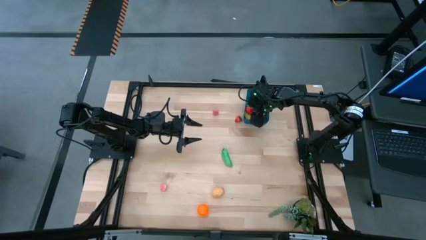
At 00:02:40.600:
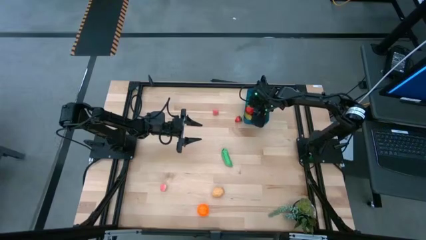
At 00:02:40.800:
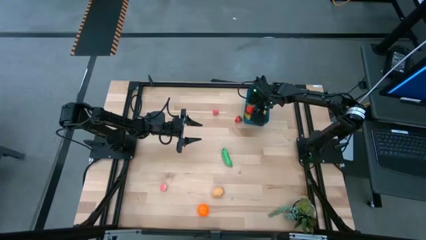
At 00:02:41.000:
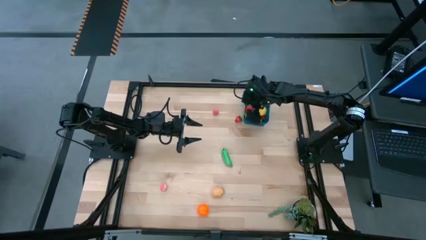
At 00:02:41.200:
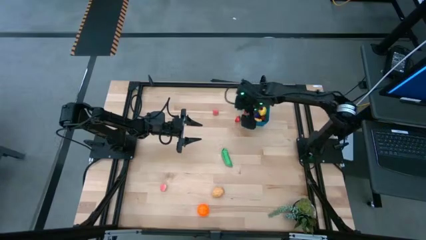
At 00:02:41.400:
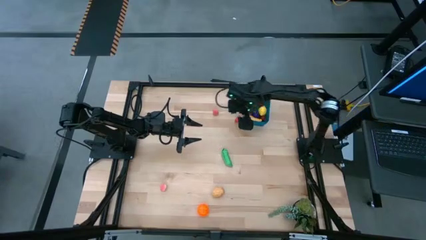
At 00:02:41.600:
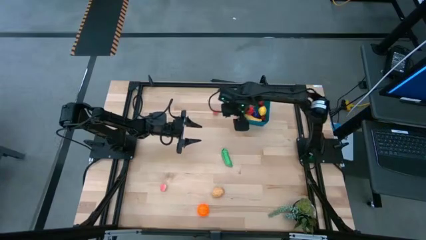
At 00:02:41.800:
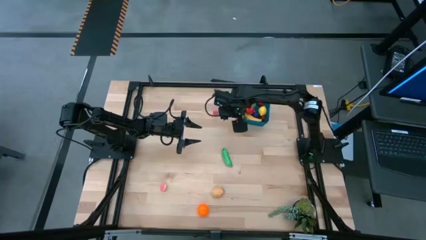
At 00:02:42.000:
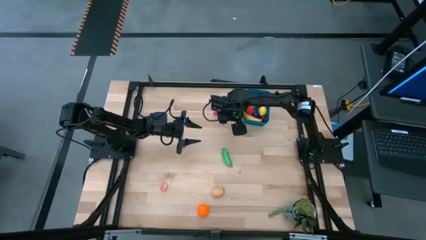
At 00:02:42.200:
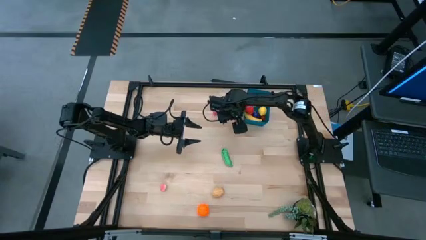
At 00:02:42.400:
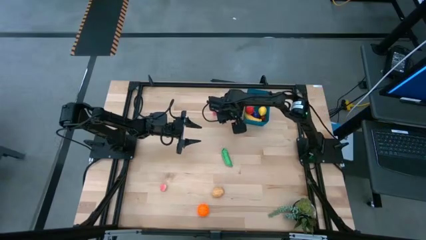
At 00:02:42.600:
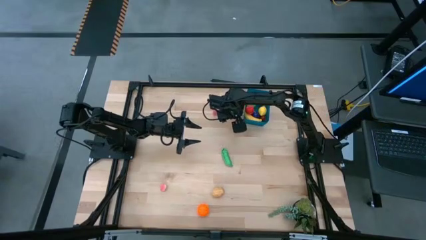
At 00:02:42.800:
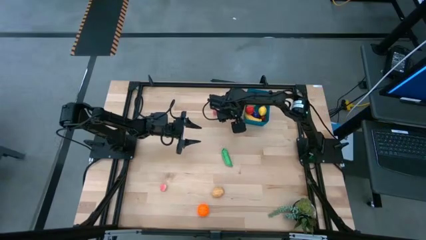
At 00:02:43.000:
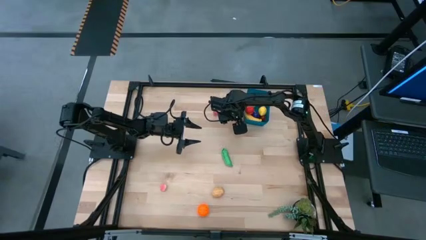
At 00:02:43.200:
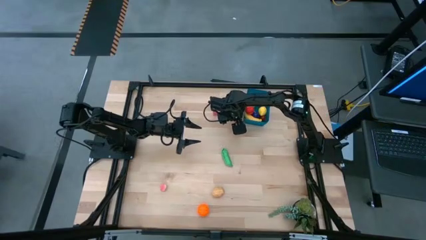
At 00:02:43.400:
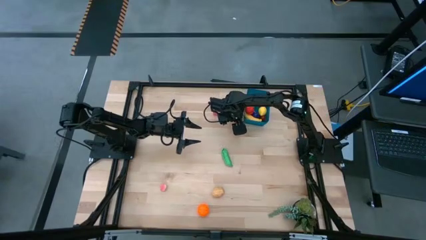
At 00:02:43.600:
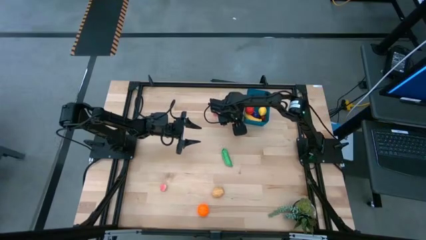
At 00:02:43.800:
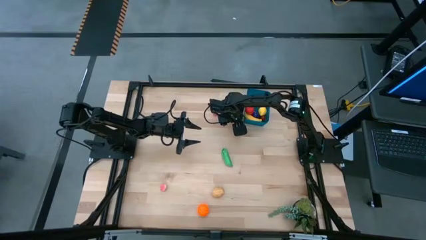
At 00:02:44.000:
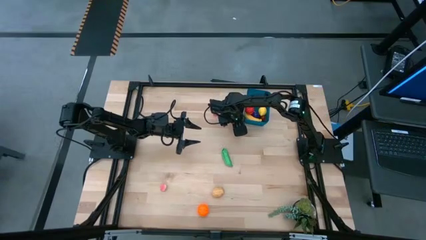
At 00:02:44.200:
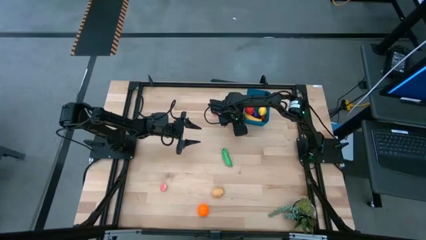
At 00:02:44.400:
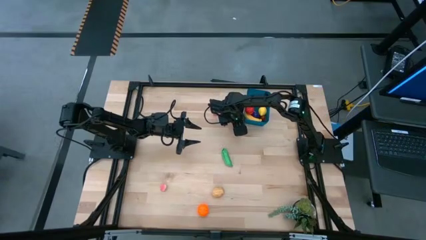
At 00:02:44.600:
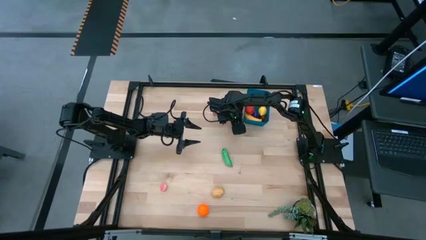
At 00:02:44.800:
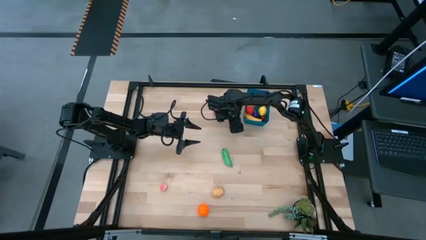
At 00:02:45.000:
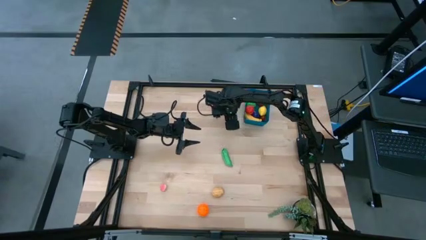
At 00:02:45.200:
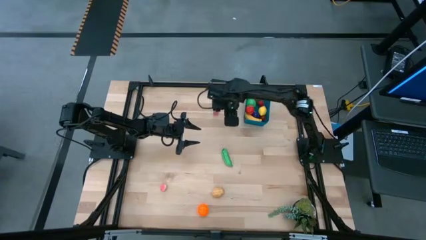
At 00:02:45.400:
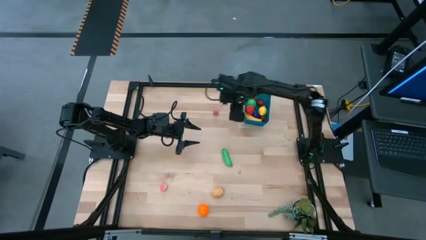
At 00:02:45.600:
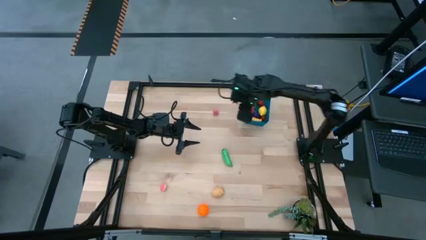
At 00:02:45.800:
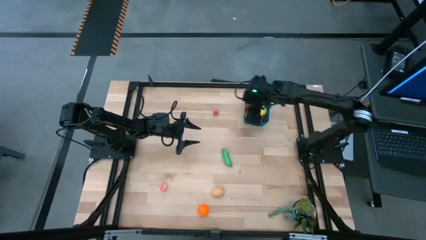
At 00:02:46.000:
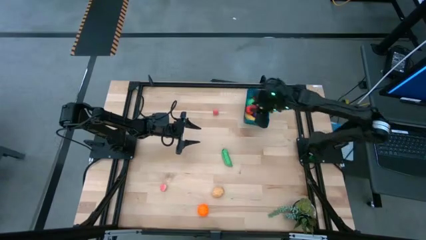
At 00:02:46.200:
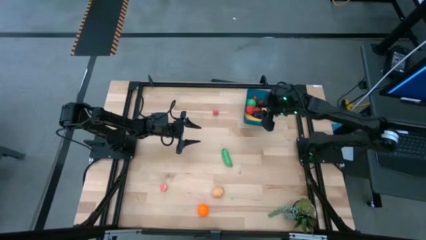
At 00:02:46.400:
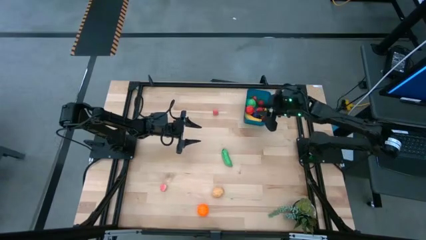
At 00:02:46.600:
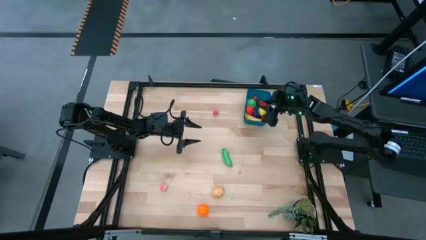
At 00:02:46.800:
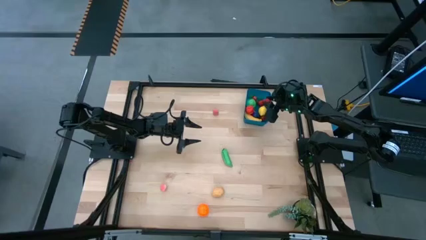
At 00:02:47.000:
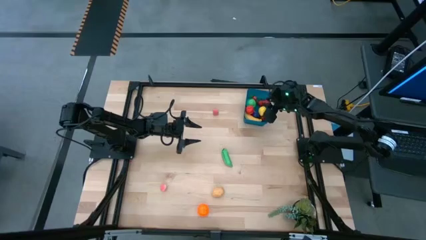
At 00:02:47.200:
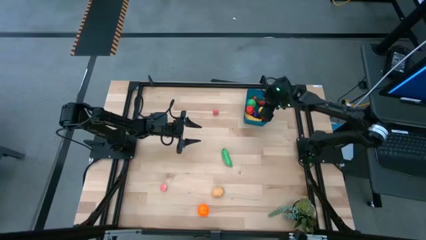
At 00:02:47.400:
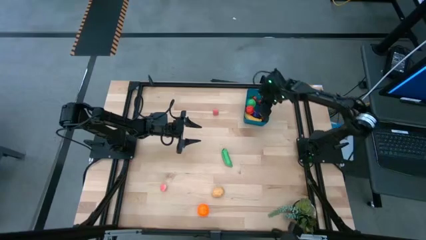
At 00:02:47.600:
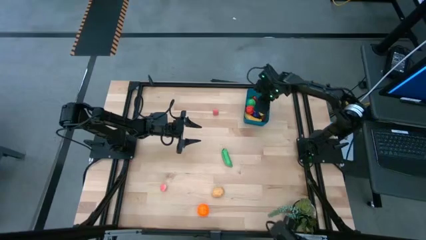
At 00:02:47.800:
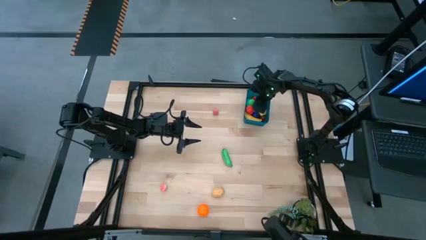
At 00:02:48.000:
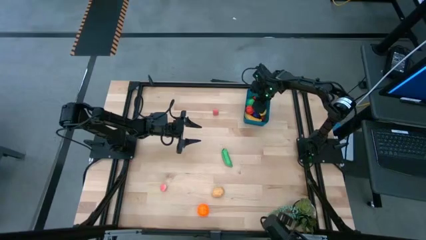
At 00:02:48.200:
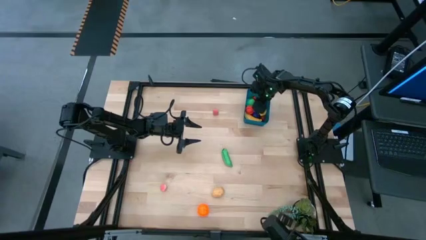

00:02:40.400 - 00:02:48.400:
Task: Pick and placing Produce into tupperware
Put the red strawberry into the blue bin

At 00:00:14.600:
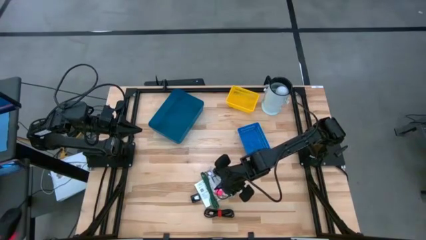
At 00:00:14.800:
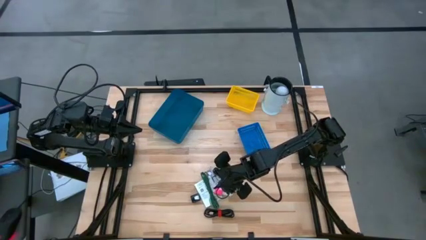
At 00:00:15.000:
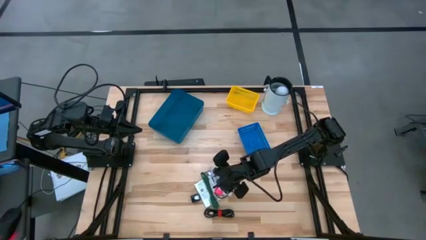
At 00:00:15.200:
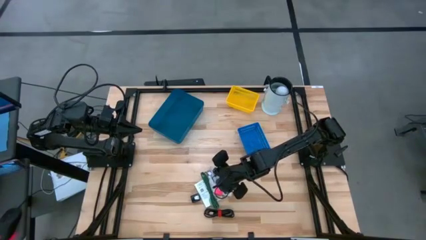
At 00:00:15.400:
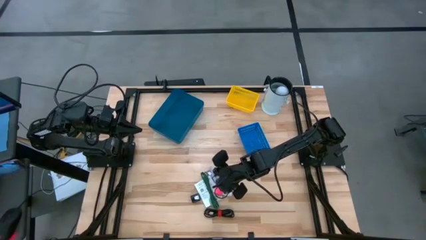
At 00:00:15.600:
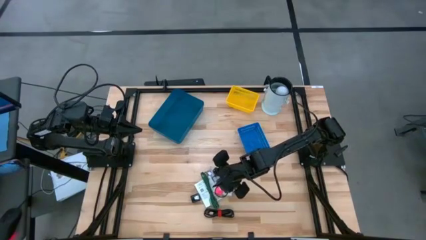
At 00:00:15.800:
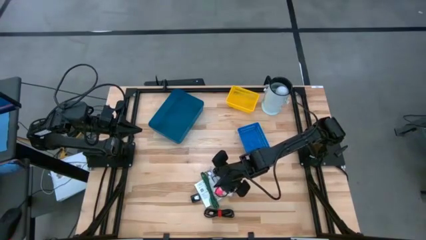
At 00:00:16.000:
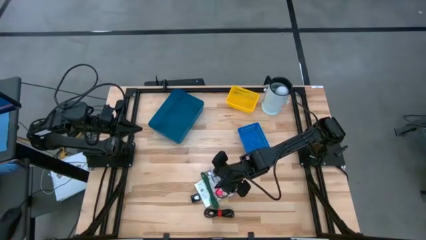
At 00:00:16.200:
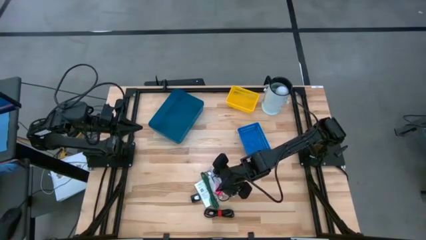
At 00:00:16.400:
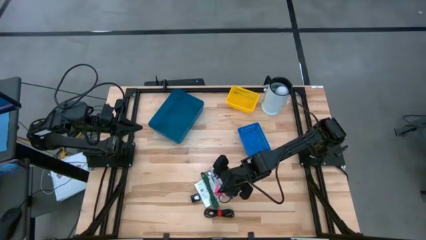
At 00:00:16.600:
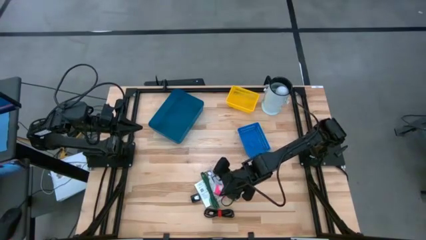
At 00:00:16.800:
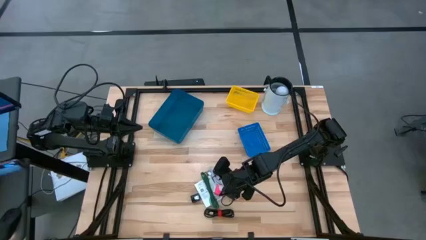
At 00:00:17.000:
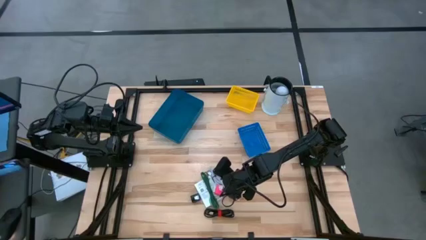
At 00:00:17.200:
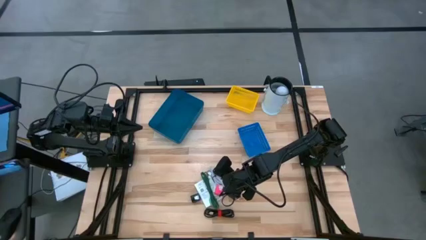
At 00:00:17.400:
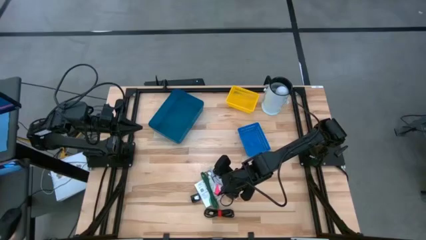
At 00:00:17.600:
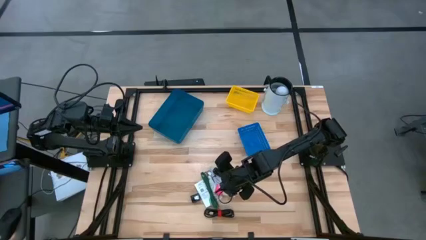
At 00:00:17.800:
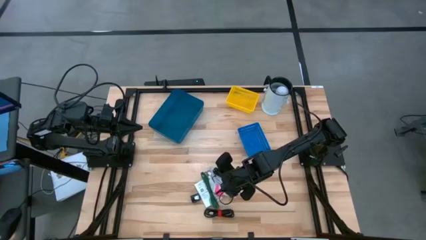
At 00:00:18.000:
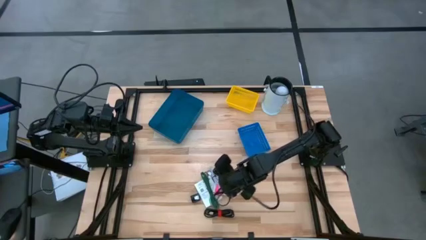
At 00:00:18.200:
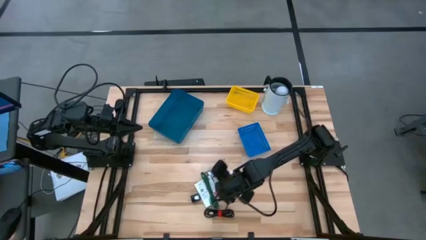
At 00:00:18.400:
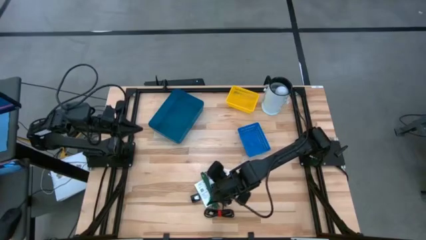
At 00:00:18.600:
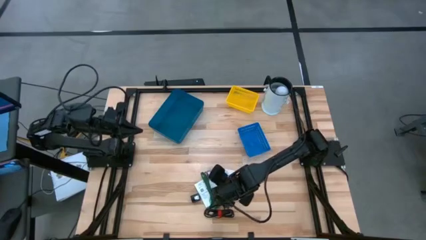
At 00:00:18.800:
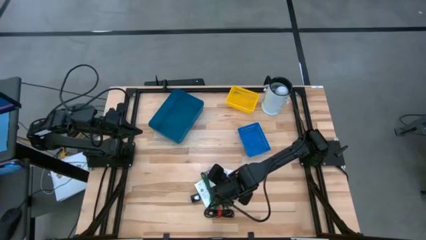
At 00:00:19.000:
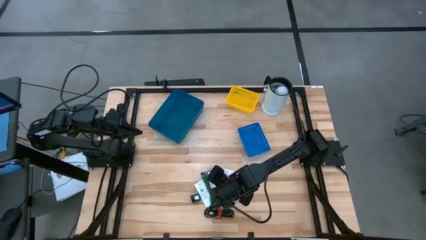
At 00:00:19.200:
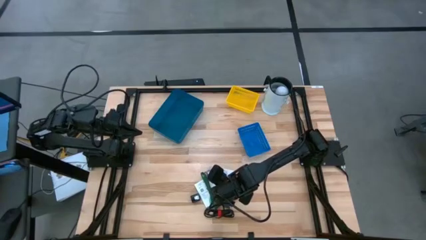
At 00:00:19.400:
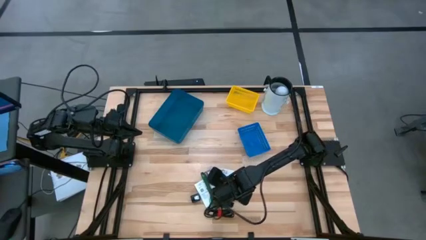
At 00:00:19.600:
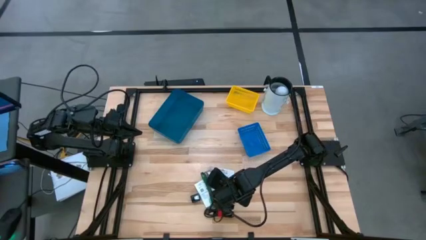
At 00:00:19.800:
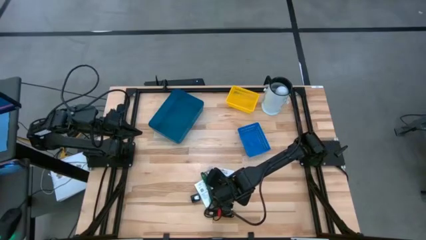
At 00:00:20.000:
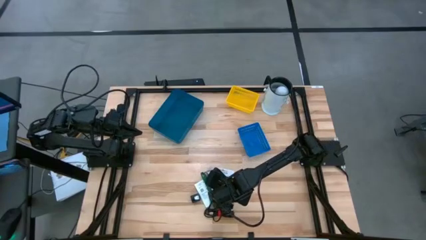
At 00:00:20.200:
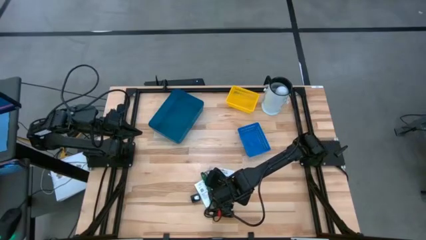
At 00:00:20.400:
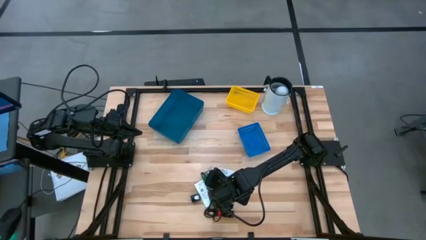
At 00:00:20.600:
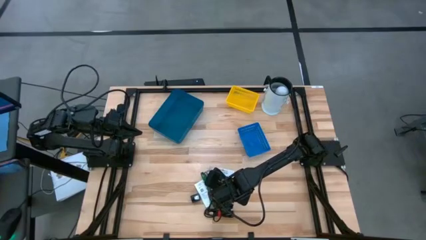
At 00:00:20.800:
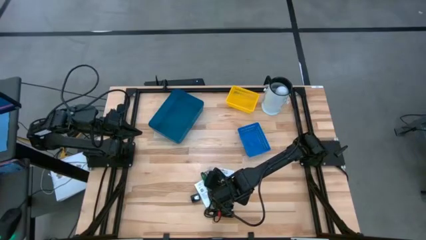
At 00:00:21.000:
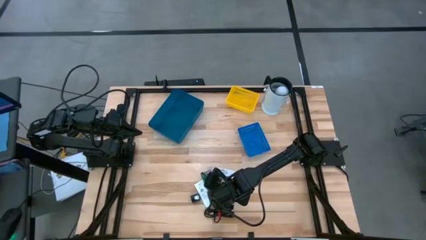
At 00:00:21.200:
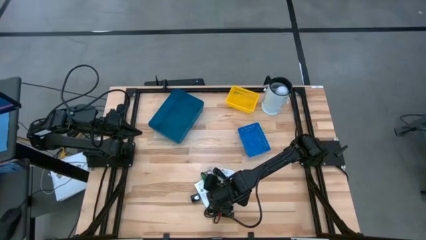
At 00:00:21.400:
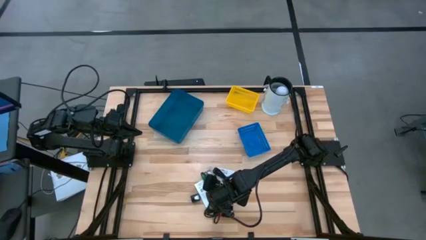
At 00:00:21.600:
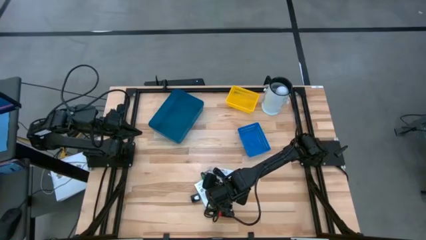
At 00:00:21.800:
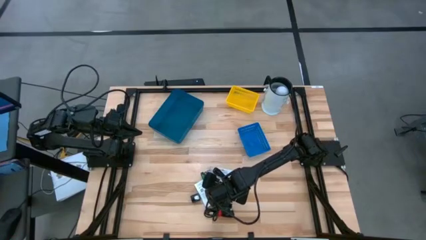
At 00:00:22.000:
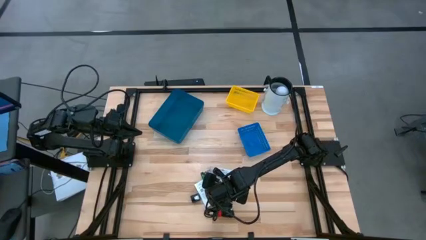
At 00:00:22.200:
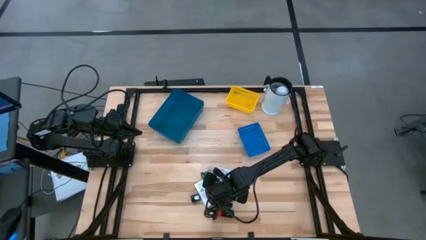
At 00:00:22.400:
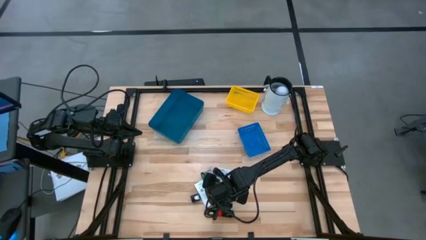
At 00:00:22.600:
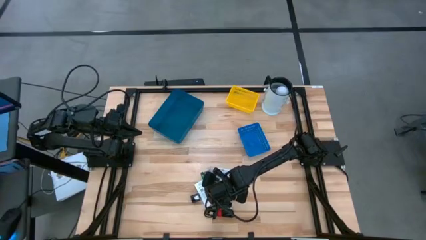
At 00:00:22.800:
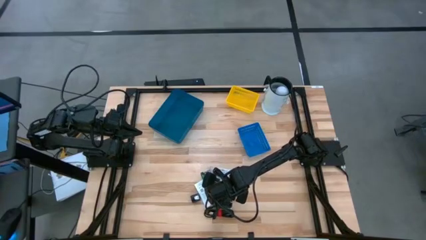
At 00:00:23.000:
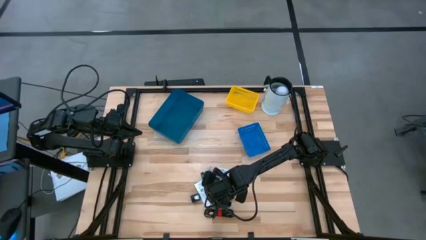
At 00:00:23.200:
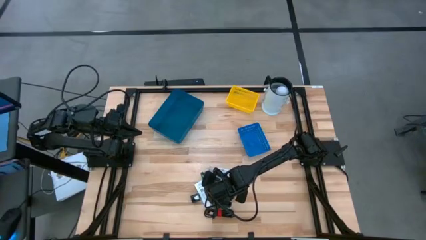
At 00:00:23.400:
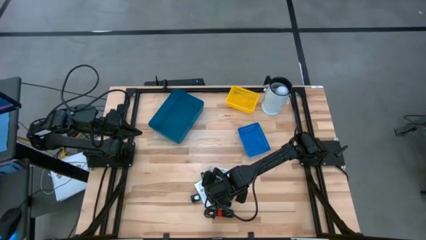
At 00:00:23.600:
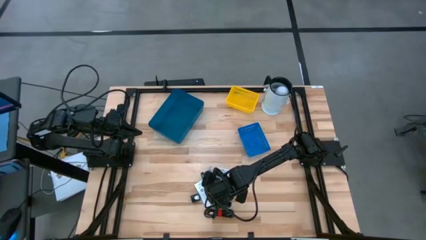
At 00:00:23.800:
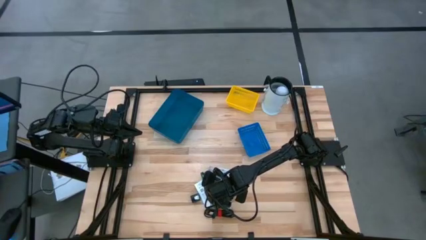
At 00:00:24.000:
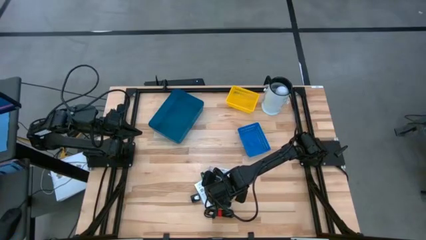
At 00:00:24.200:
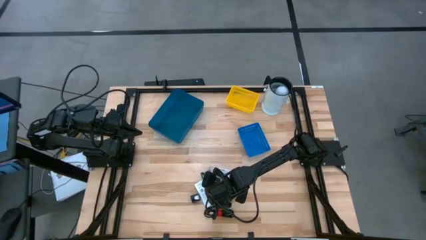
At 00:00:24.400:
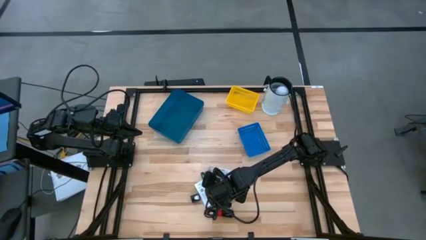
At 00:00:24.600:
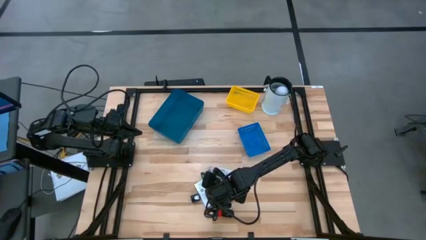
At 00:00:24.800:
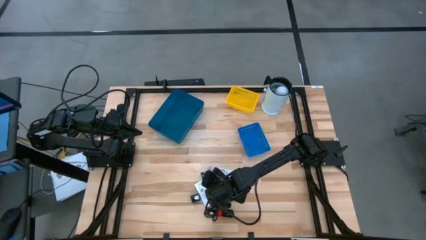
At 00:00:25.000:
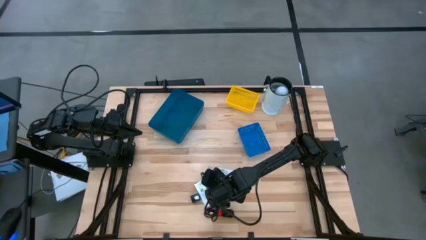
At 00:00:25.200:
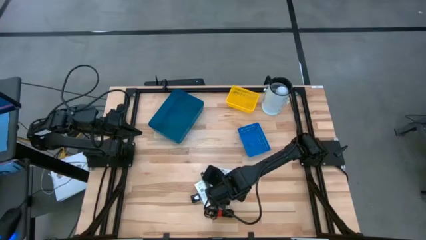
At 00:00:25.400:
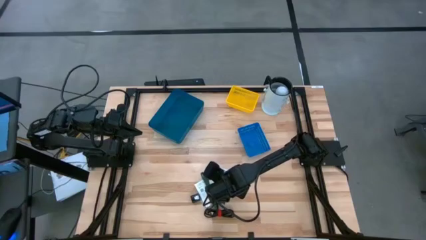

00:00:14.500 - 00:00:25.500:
Task: Pick and place items into bin
Put the pink charger adapter into the blue bin
